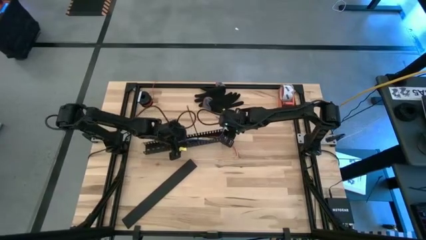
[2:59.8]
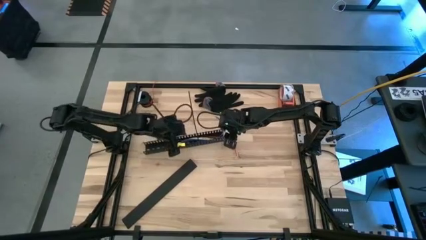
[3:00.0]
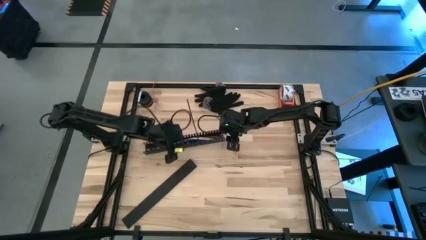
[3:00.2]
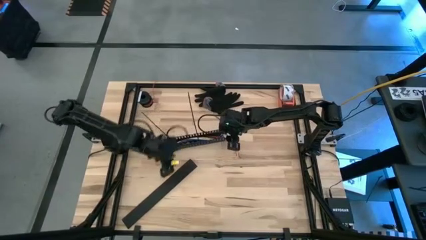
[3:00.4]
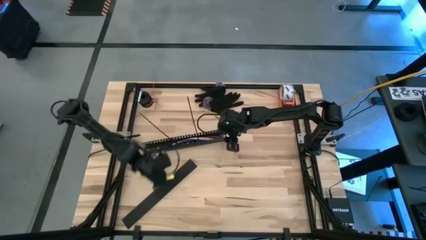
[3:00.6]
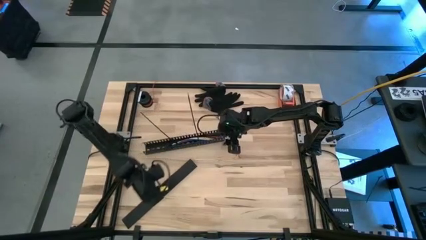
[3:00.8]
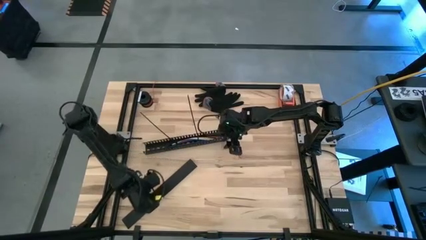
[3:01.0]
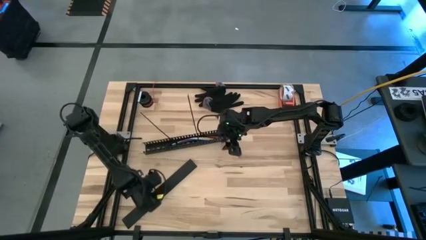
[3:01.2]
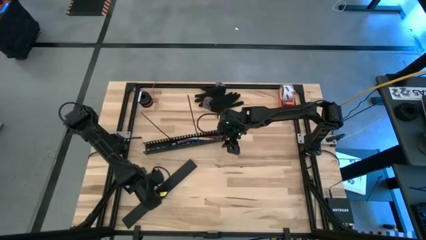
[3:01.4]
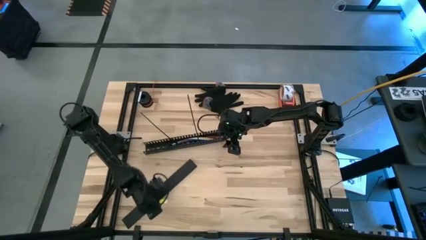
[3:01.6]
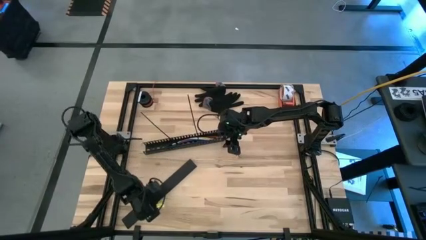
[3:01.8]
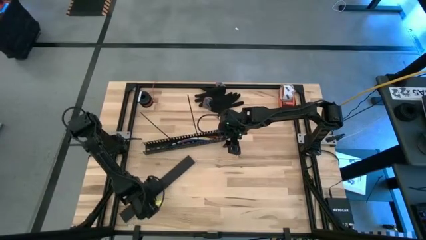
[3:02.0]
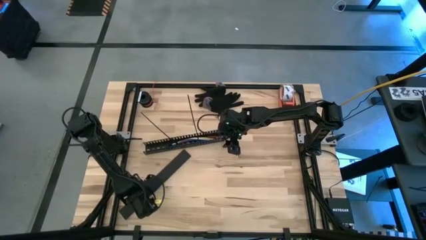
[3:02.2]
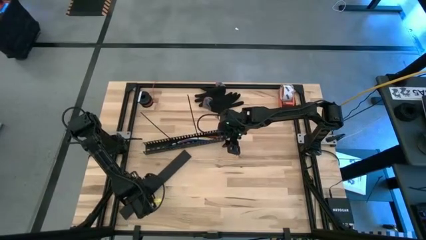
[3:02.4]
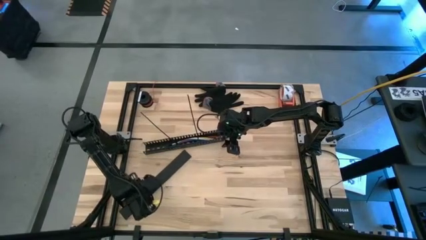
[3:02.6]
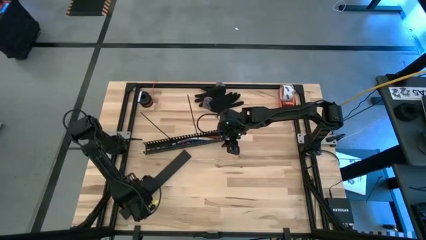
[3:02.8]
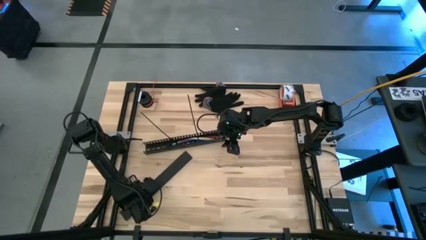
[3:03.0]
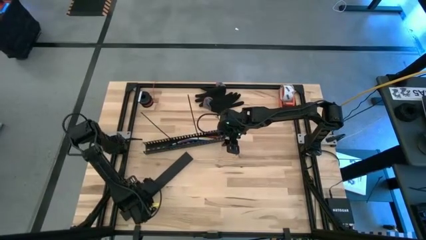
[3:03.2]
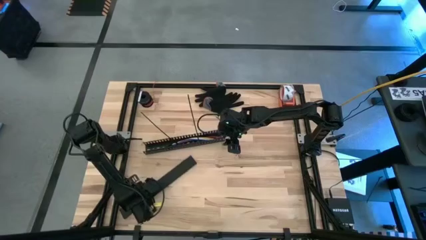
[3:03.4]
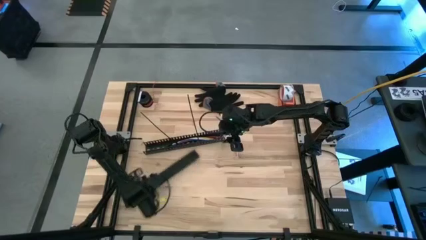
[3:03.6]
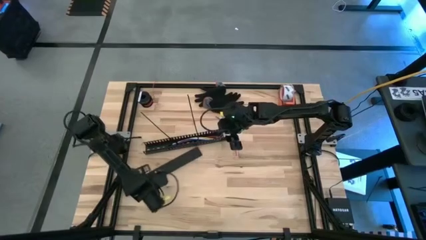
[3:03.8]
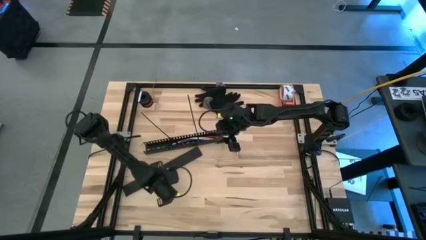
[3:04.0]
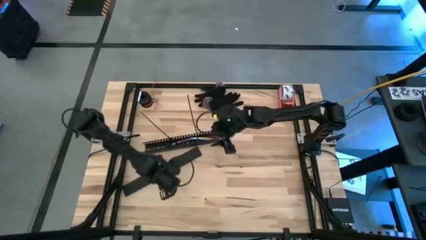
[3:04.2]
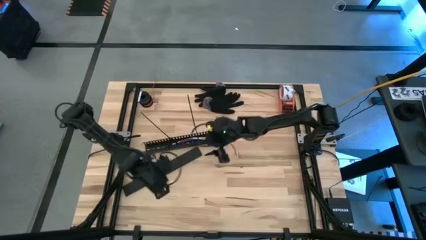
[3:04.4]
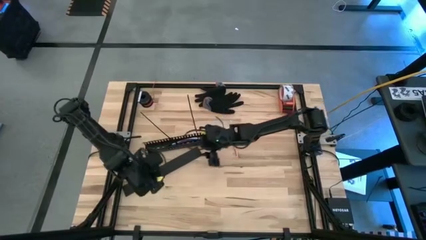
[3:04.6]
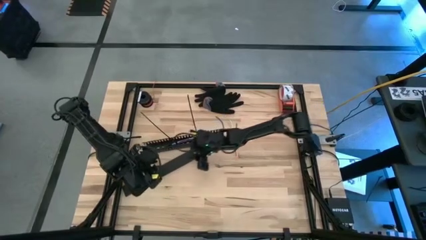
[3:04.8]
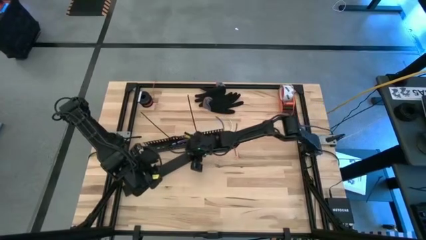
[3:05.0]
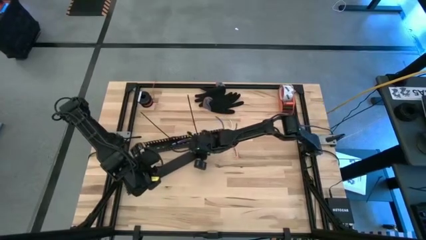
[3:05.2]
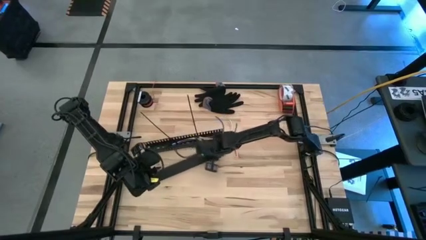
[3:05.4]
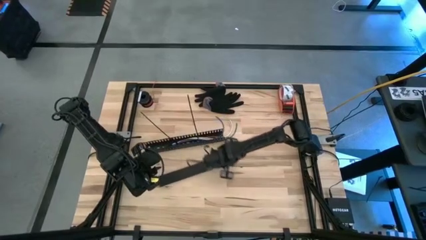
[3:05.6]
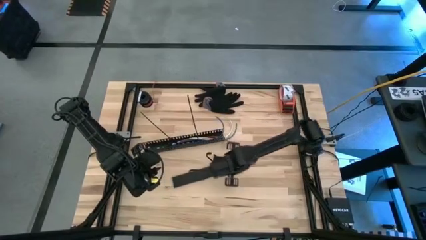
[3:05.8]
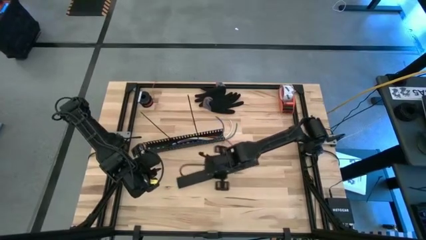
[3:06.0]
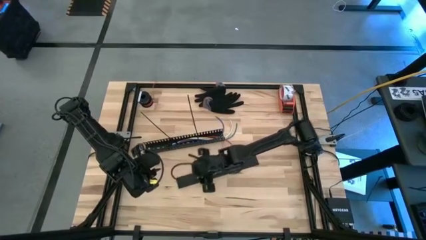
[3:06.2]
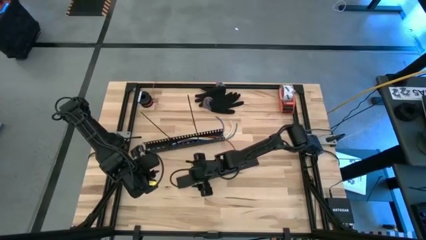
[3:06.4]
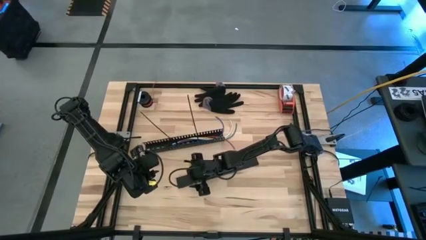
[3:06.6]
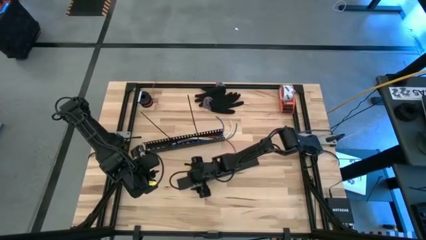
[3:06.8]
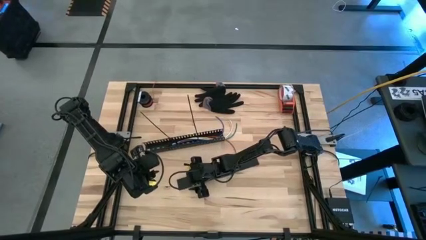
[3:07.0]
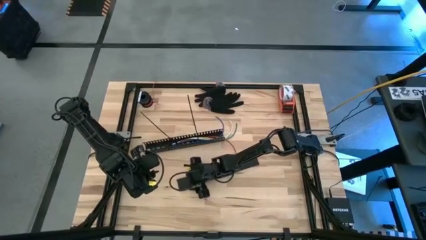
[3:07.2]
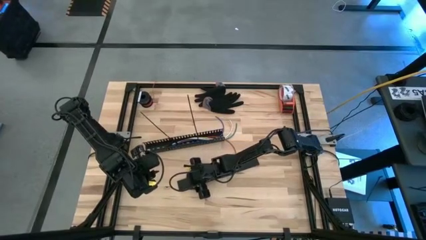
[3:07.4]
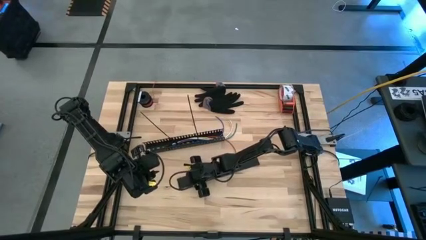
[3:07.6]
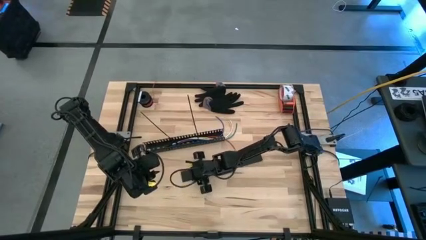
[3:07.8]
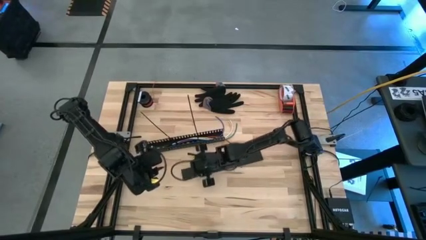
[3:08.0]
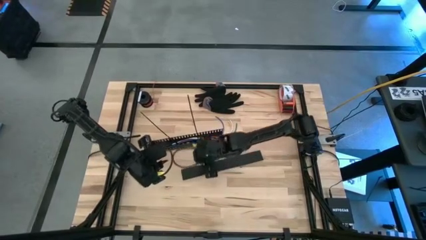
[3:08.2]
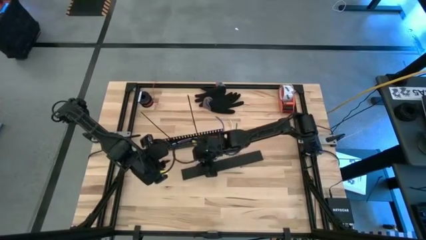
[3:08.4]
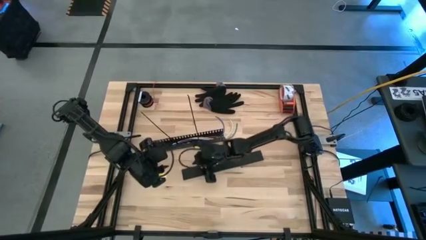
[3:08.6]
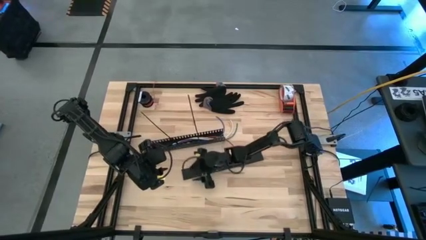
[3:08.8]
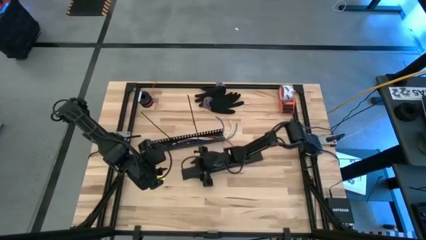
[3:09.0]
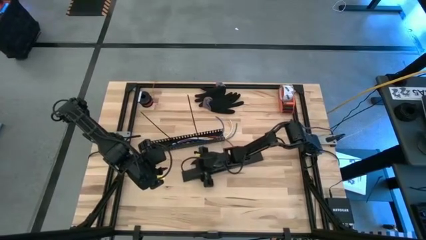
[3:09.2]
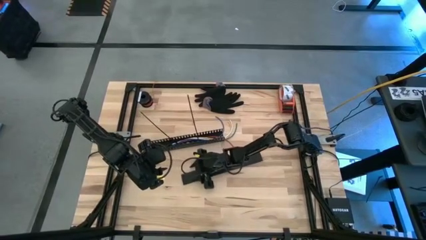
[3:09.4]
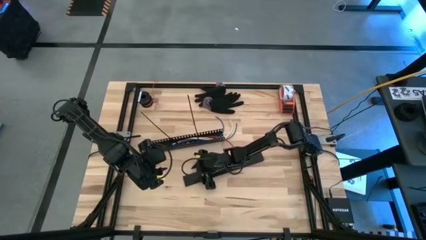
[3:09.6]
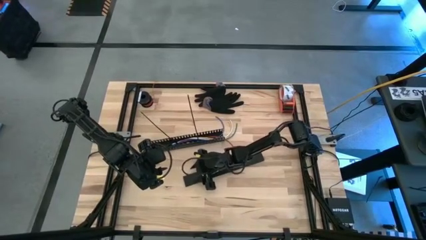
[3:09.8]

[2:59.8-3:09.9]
Task: Ziptie cables
Close the black cable duct lid

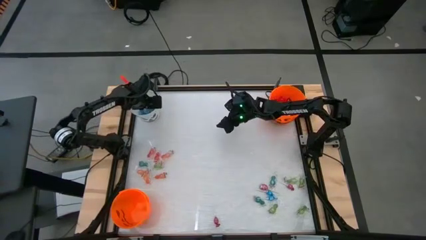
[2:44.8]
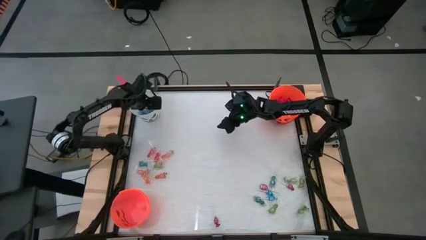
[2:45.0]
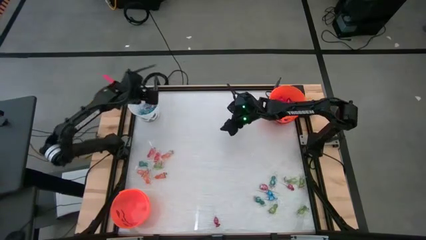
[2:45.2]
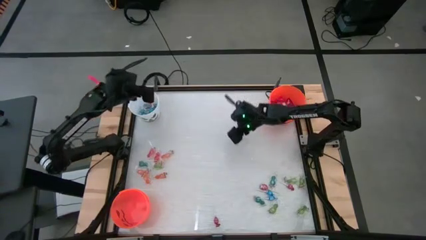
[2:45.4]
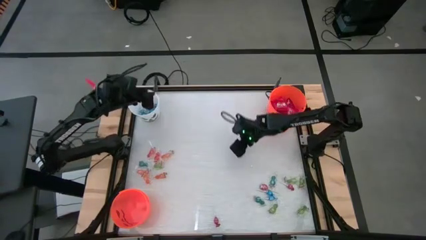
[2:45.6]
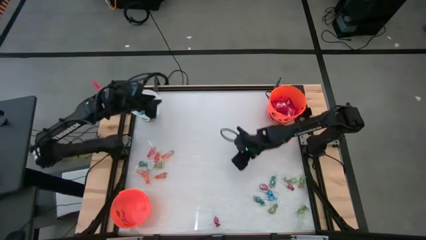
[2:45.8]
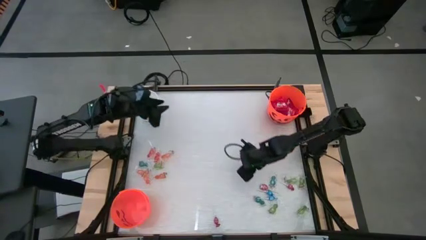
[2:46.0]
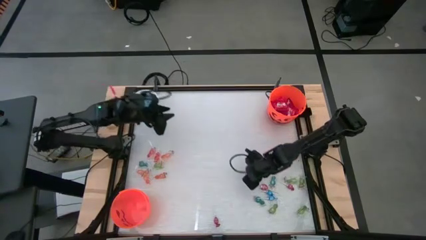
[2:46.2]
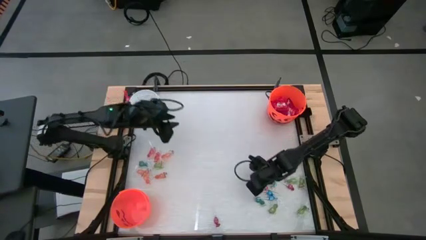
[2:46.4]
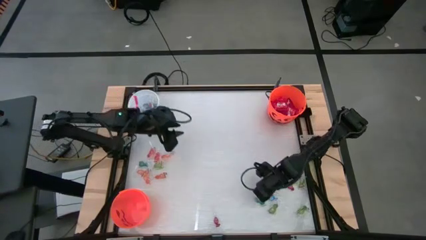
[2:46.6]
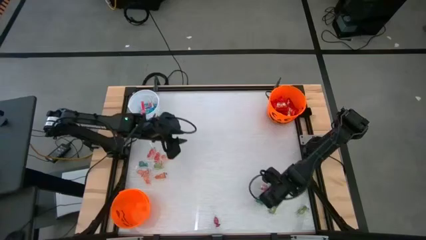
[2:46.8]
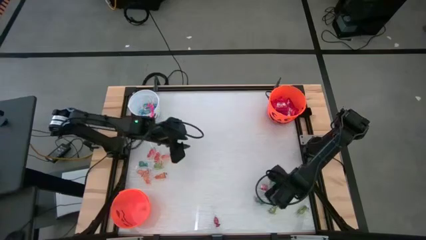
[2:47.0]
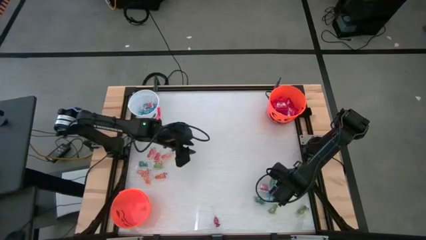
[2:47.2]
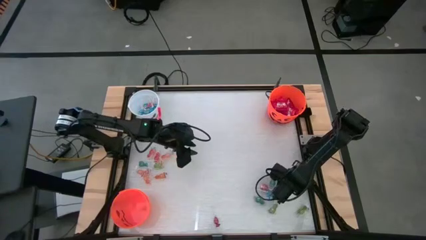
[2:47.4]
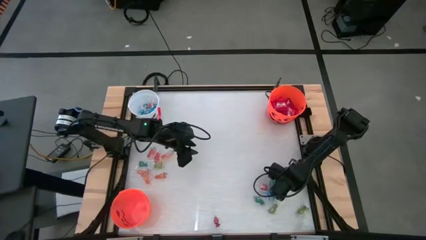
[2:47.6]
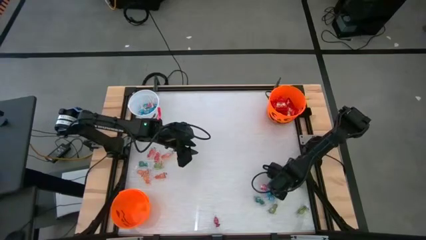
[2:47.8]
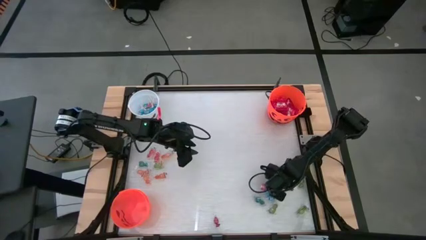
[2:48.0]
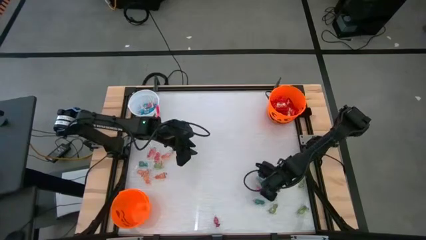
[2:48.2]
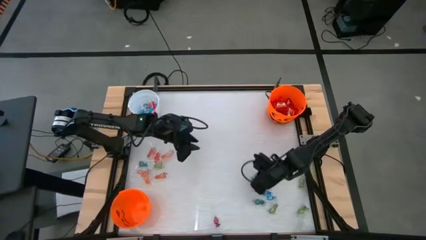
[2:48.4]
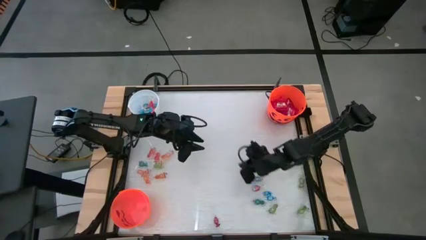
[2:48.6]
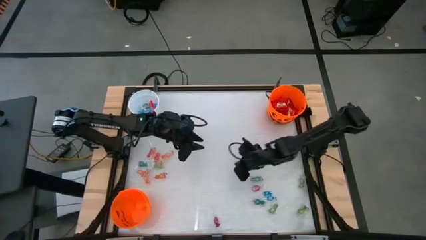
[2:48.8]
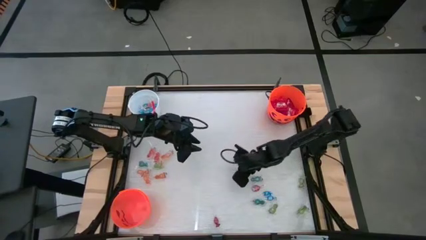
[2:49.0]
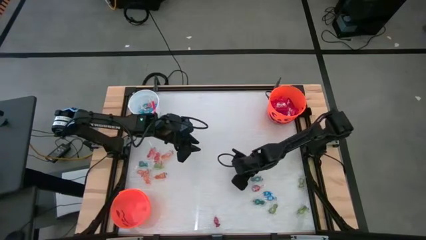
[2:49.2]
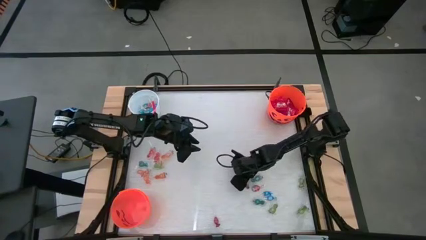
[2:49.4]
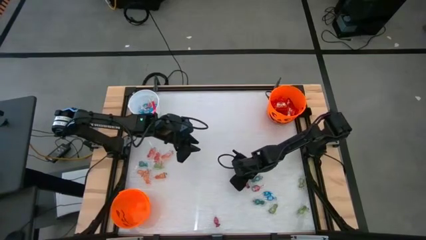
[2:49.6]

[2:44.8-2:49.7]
Task: Sort candy by brand, put in halloween buckets
Put the red lollipop into the white bucket
